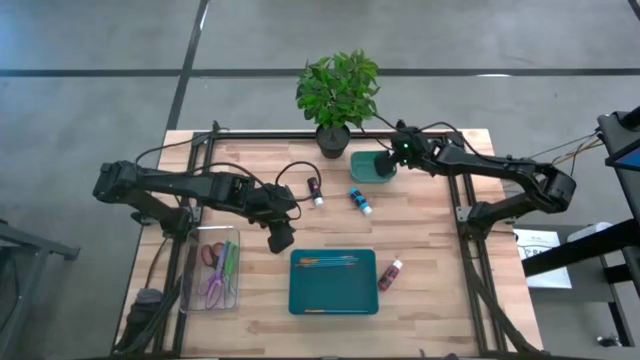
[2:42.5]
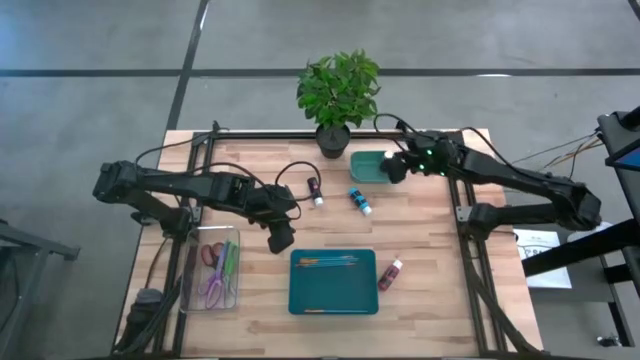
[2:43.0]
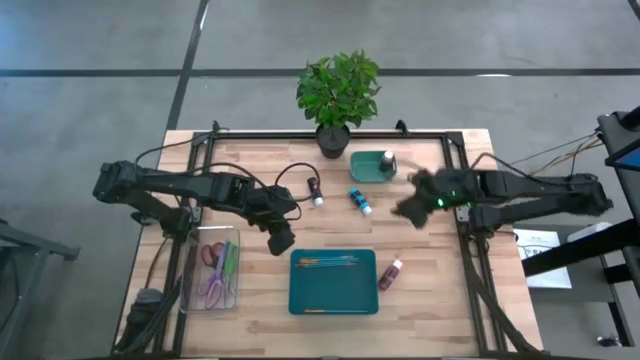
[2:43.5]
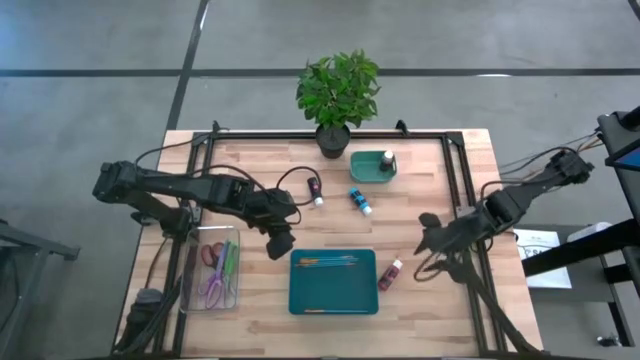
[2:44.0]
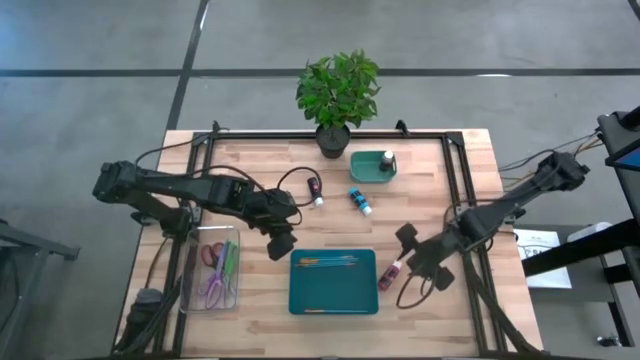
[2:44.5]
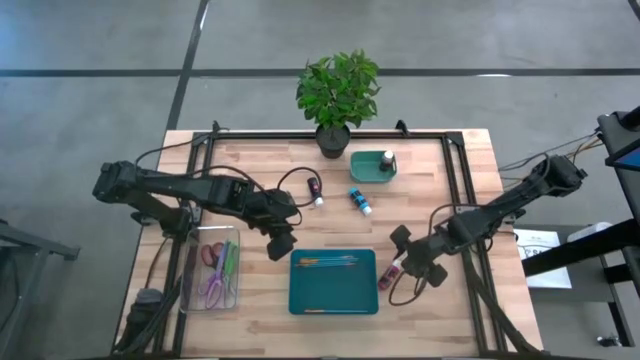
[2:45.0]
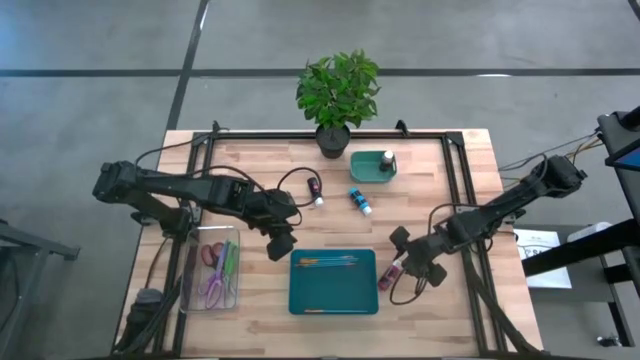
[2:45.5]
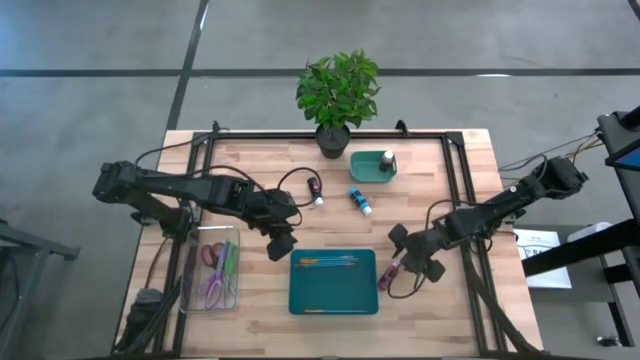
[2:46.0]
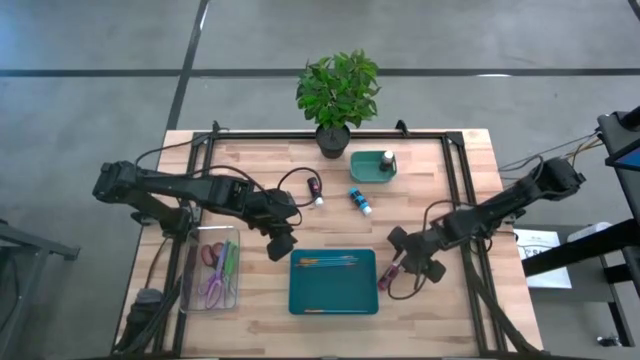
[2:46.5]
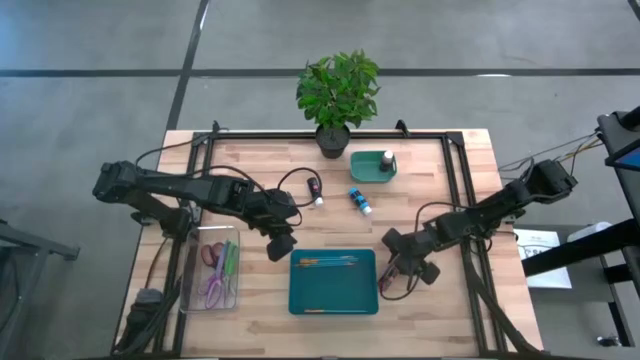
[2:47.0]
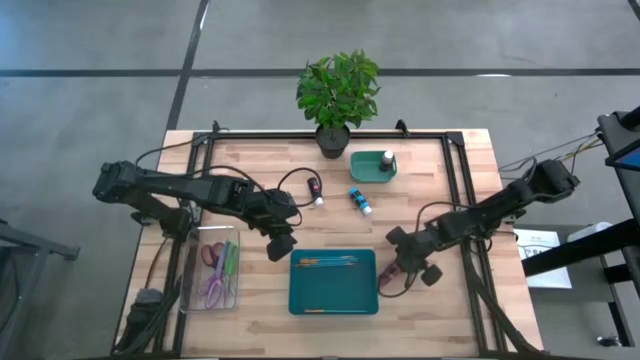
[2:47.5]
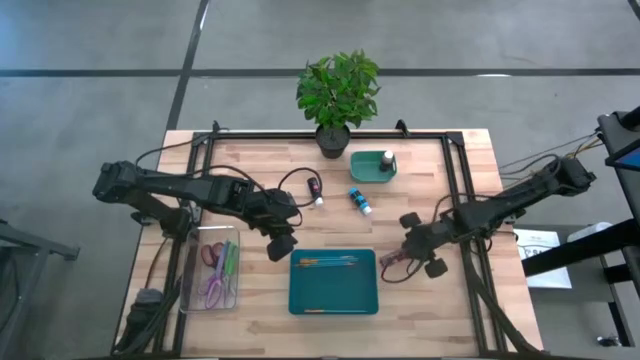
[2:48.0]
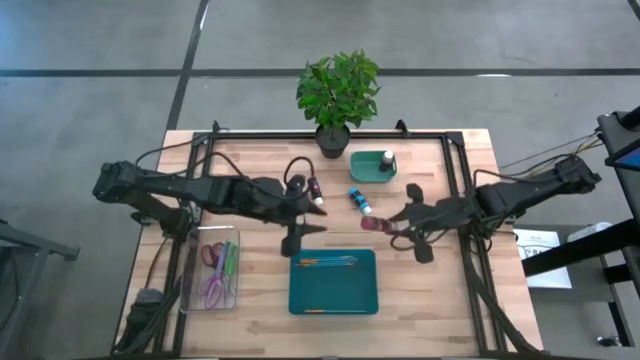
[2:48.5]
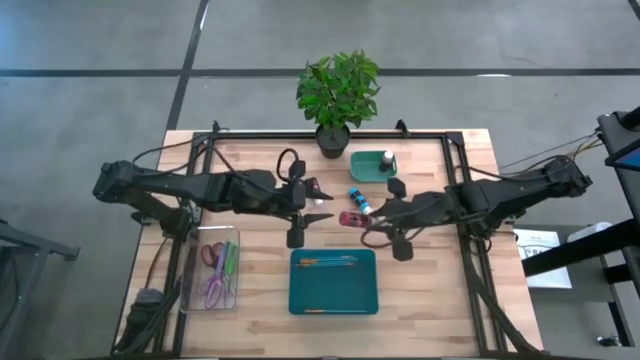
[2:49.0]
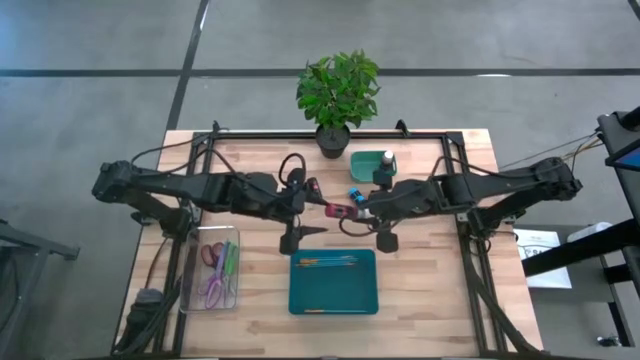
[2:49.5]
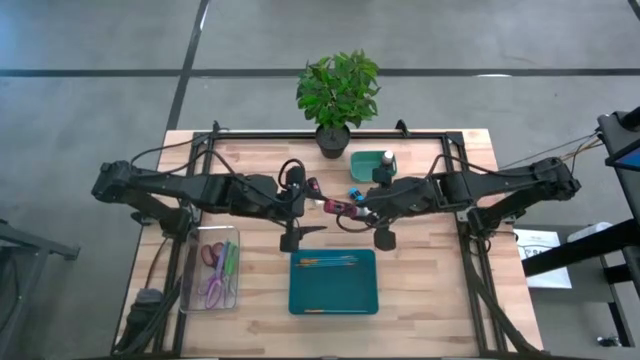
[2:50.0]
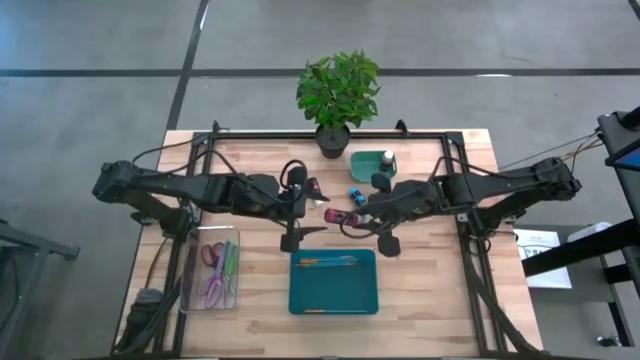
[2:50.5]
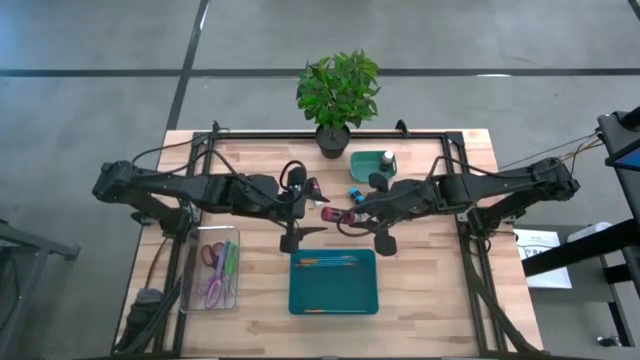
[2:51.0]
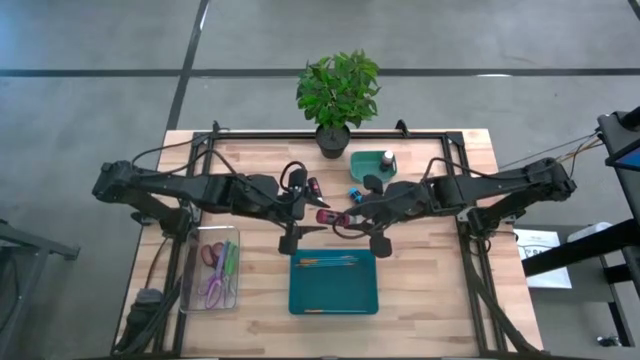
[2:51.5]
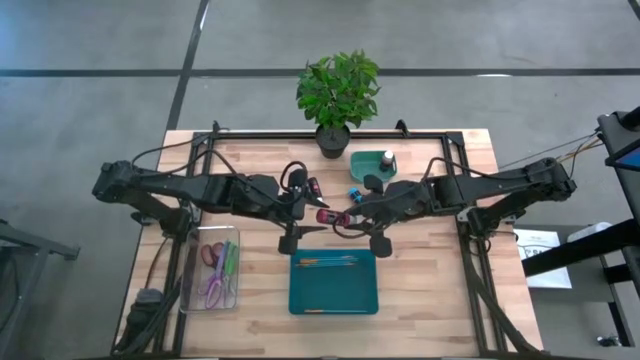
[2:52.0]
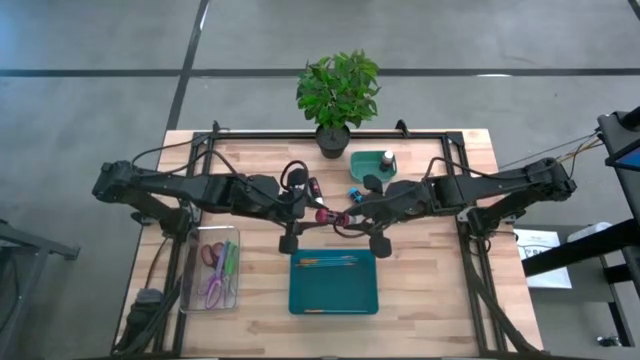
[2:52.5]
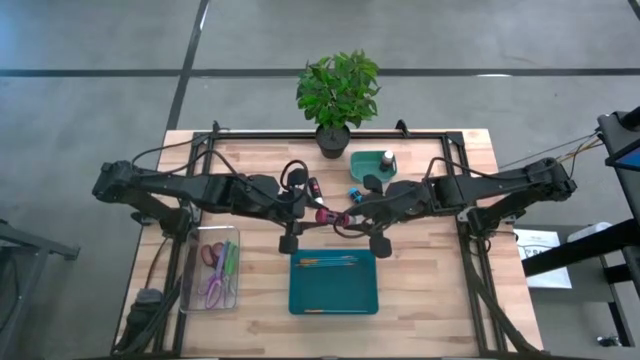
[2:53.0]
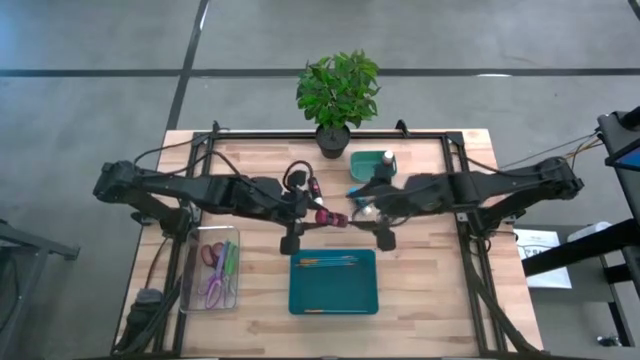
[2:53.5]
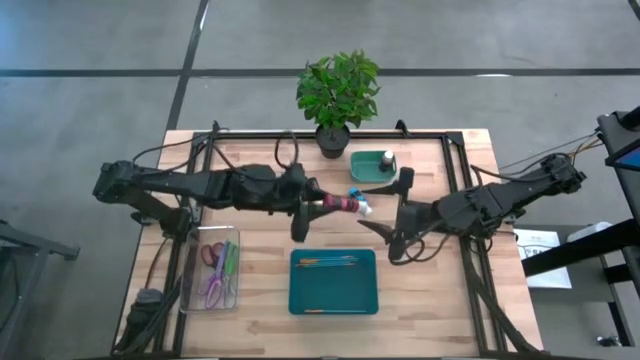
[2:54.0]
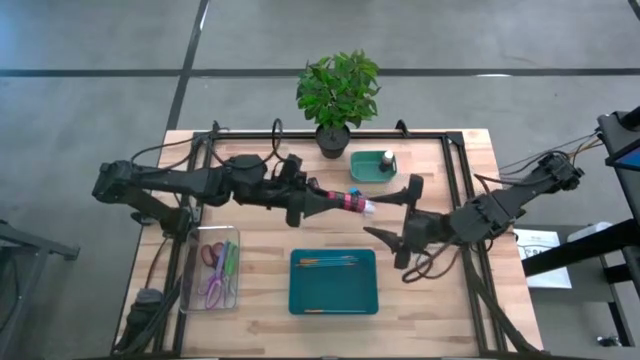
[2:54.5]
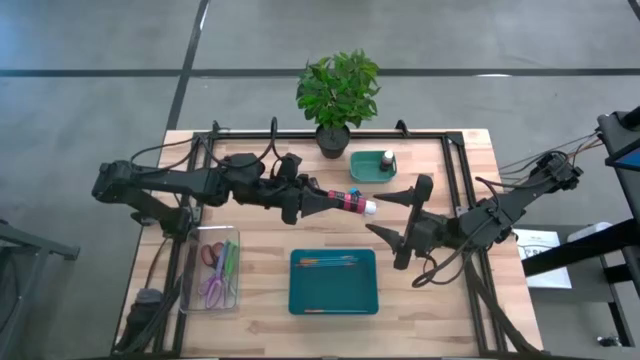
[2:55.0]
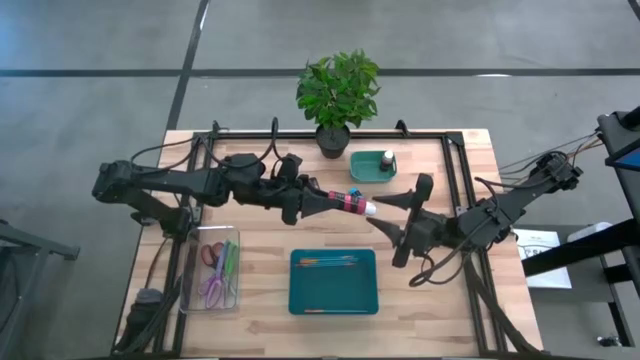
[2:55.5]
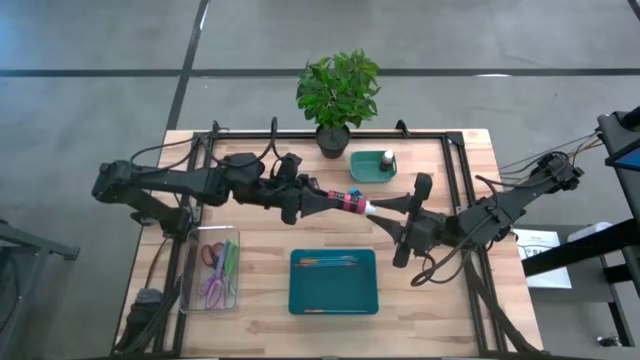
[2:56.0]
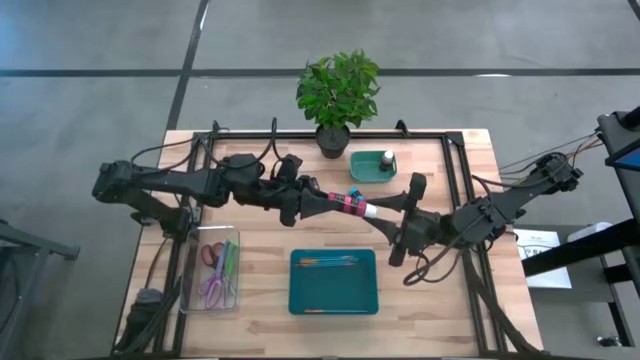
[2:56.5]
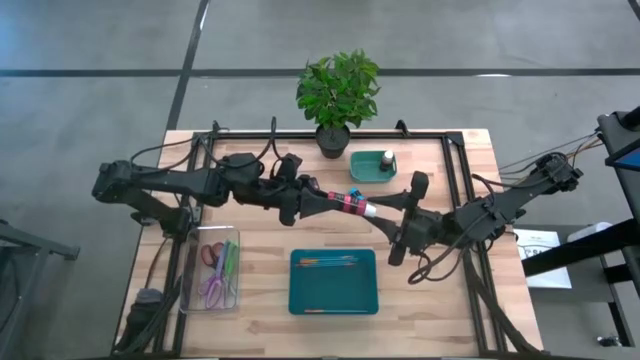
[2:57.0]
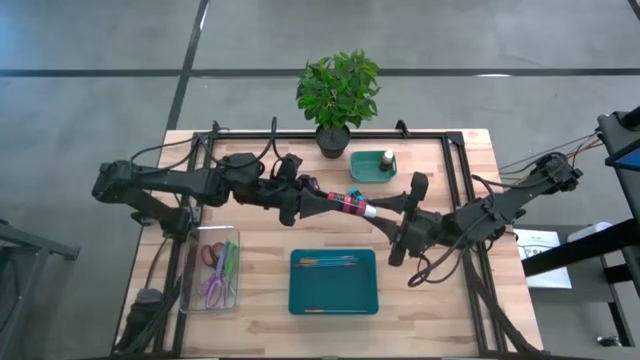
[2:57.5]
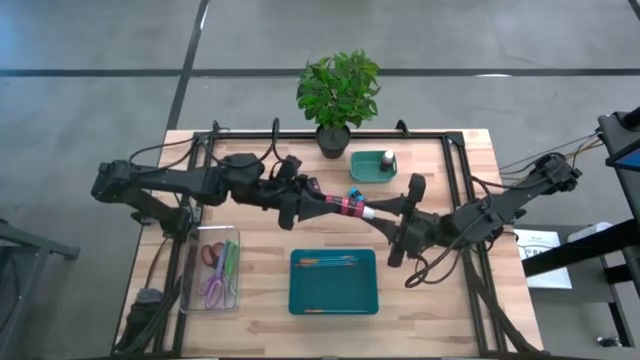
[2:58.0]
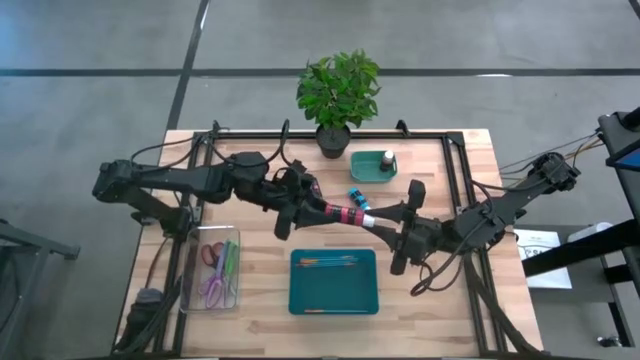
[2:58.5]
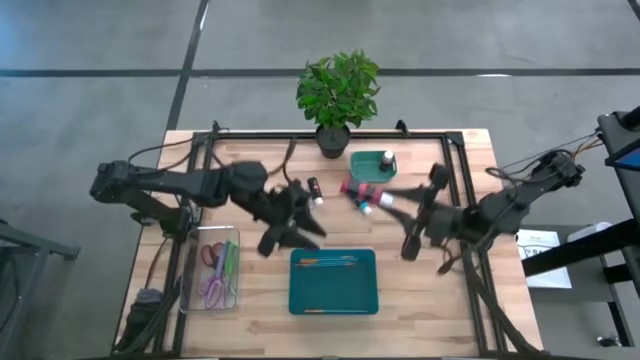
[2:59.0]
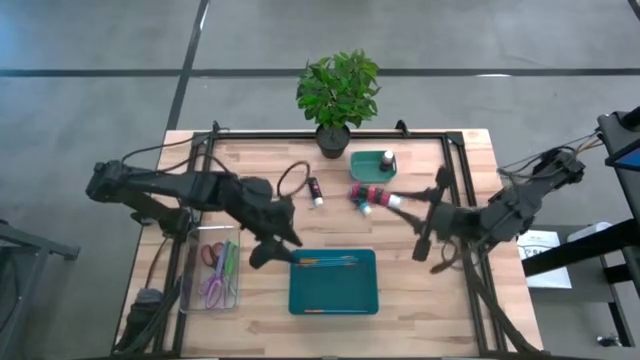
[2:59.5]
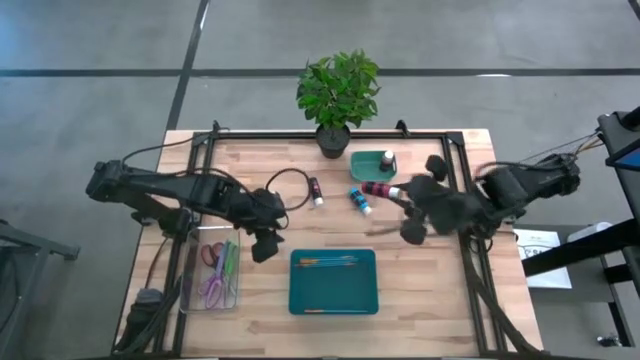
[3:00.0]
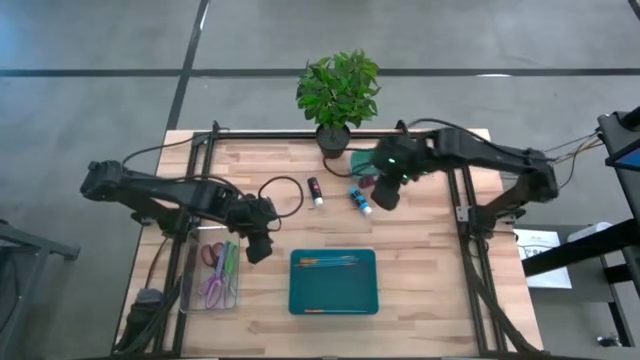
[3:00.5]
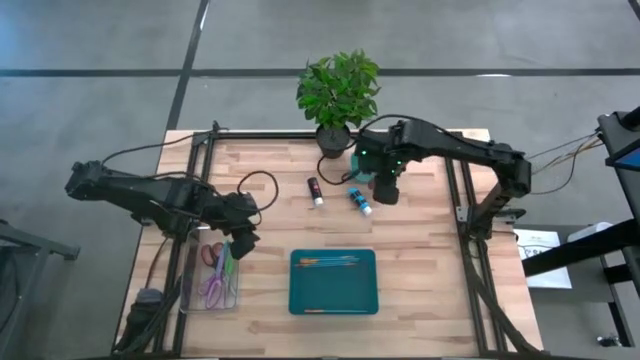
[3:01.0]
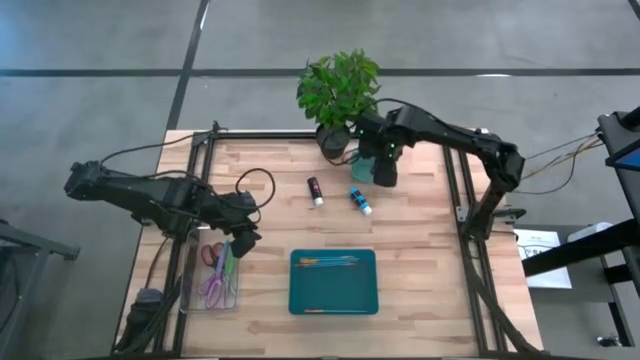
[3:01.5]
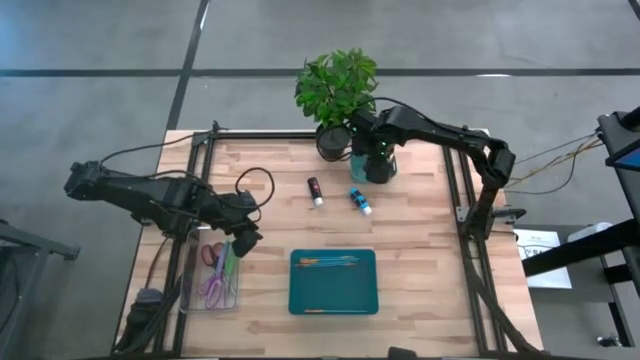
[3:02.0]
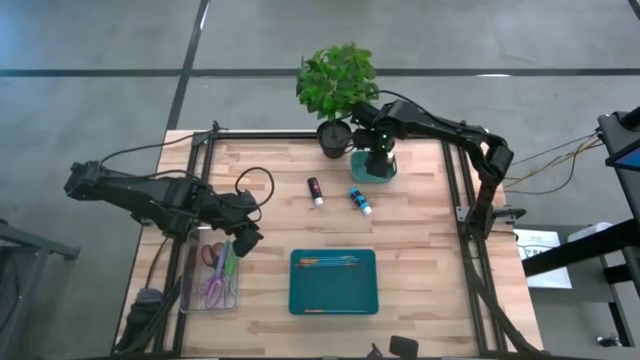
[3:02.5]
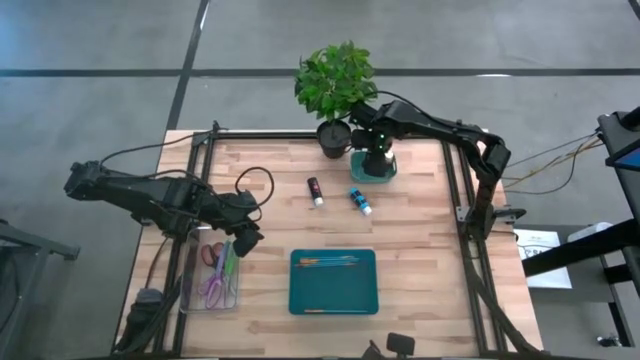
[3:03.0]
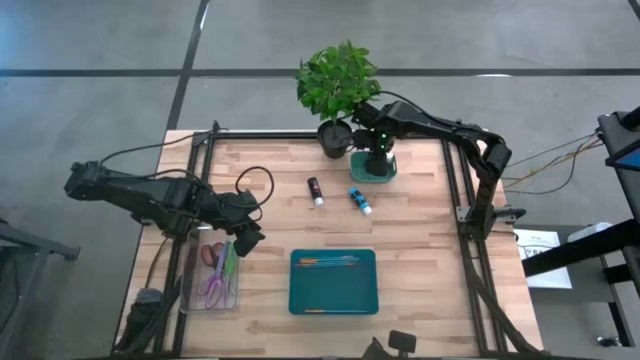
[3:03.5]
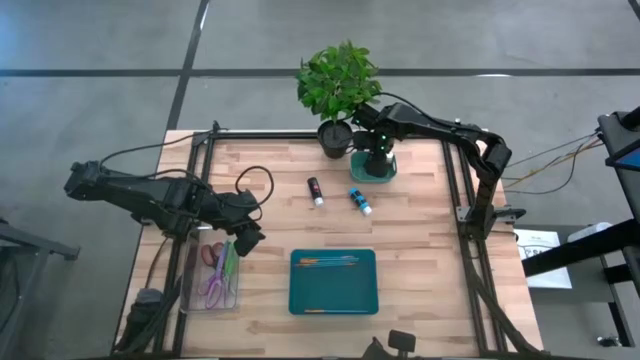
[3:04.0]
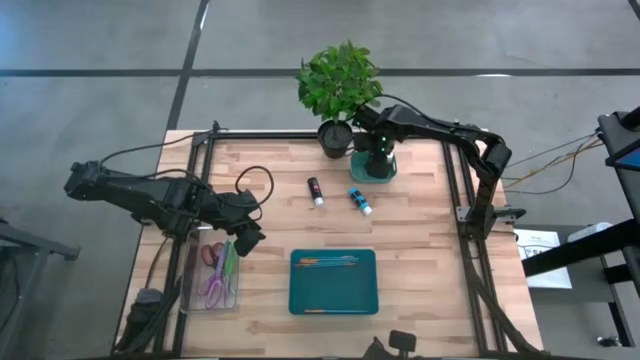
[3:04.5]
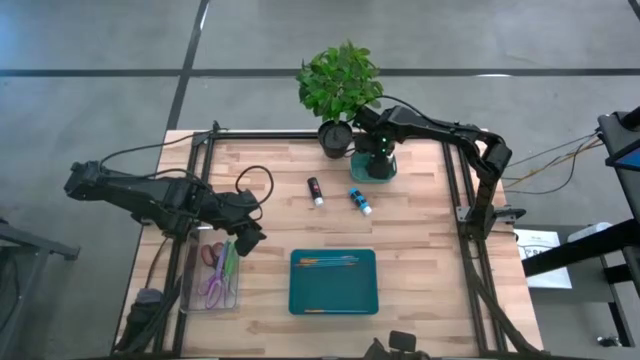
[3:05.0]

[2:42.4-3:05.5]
Task: Pick & Place Paint Supplies
Put the red paint bottle into the green bin
